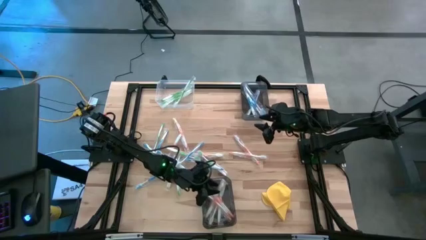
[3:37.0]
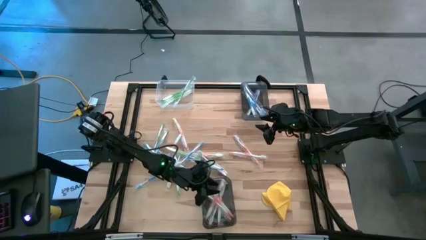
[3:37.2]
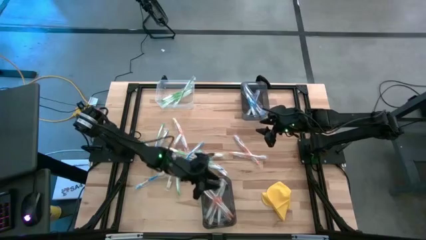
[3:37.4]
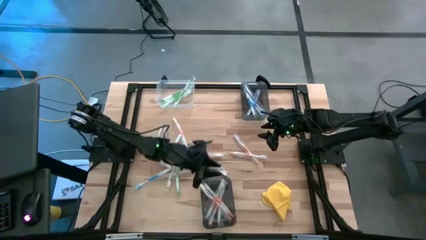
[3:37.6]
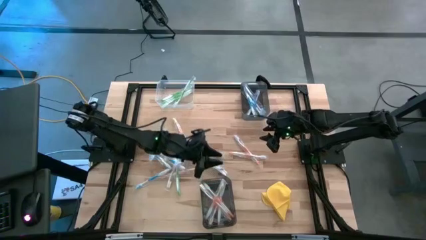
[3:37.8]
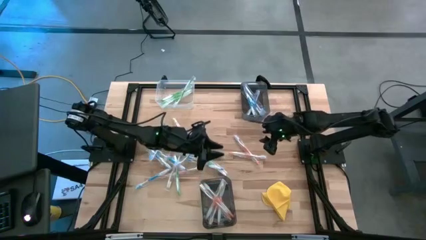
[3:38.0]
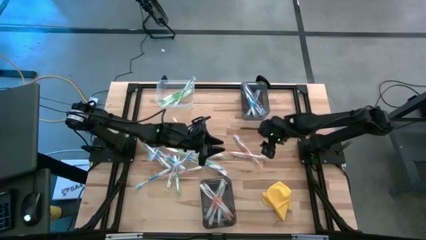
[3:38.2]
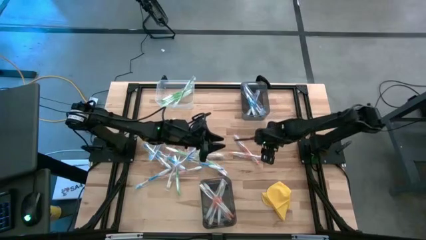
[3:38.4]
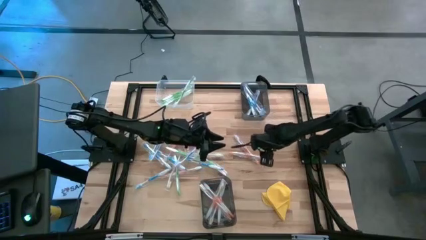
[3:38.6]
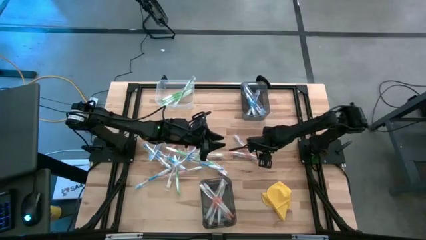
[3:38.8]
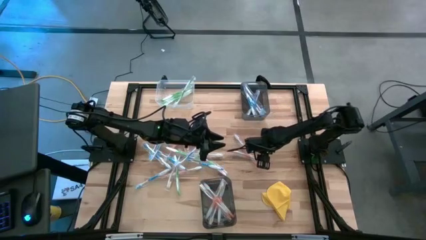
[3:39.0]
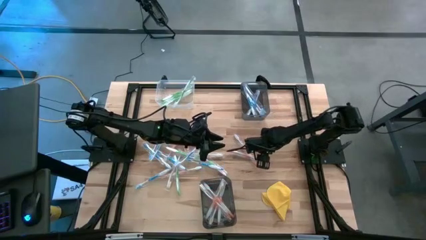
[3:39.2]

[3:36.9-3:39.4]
Task: Pick & Place Toothbrushes
Put the orange toothbrush into the bottom black bin

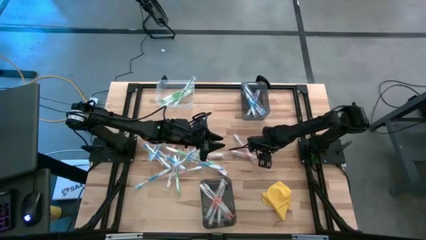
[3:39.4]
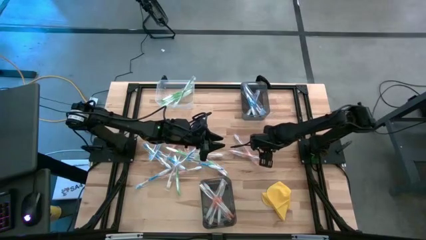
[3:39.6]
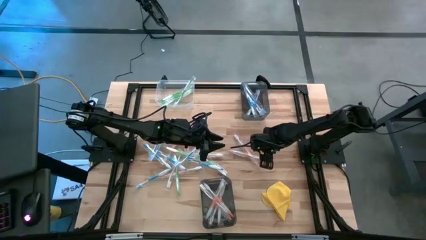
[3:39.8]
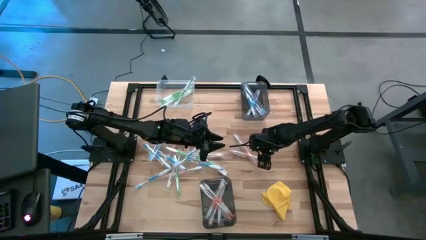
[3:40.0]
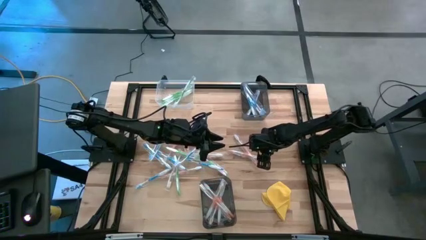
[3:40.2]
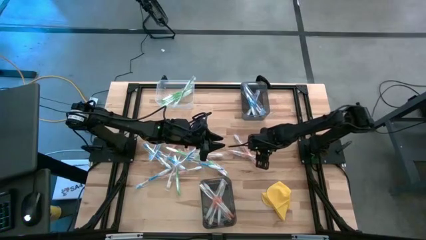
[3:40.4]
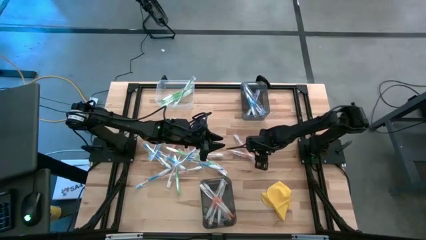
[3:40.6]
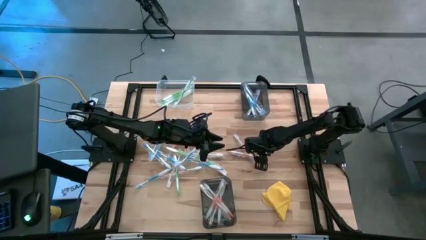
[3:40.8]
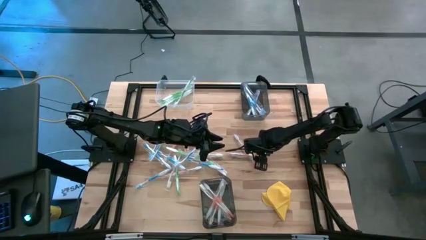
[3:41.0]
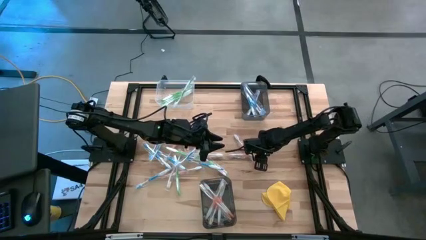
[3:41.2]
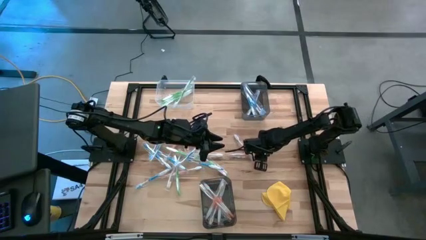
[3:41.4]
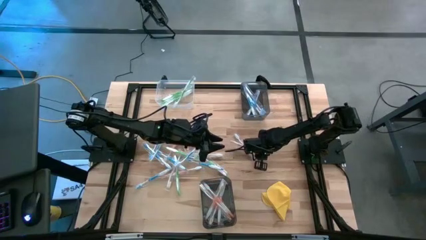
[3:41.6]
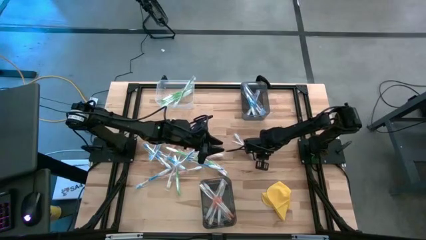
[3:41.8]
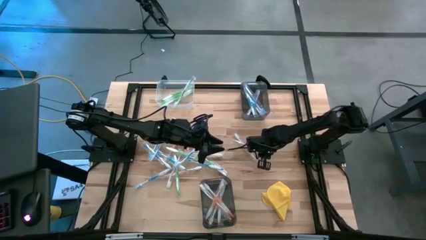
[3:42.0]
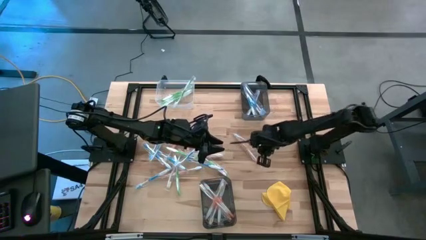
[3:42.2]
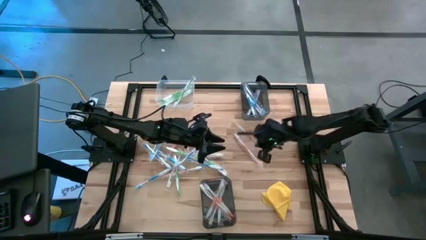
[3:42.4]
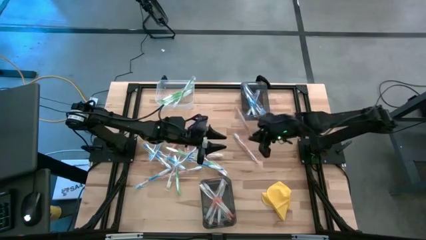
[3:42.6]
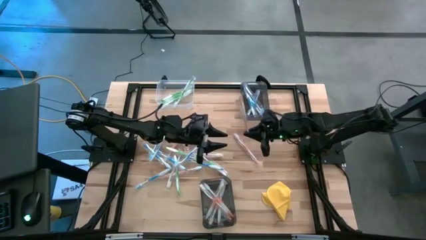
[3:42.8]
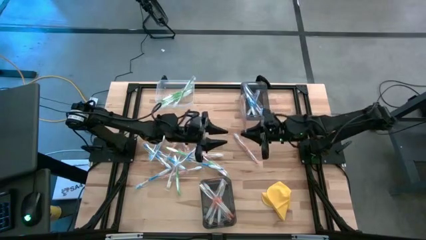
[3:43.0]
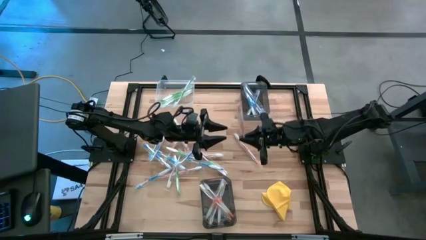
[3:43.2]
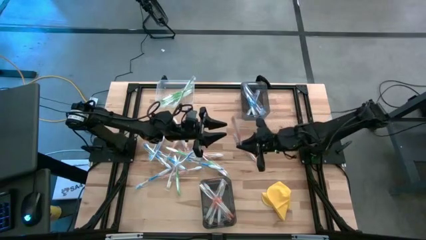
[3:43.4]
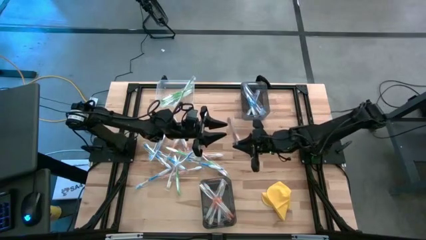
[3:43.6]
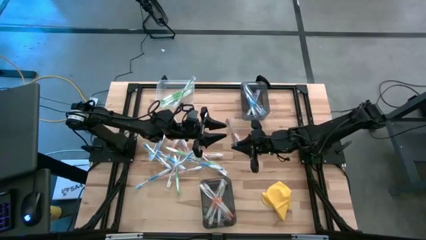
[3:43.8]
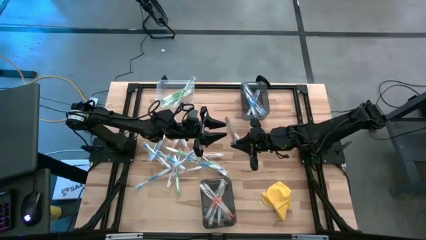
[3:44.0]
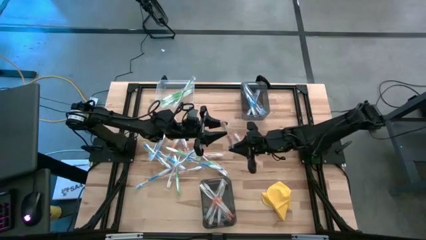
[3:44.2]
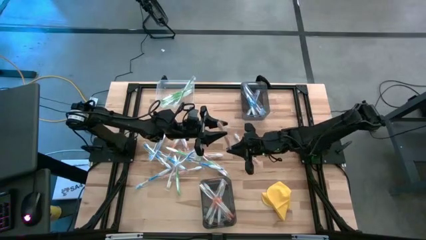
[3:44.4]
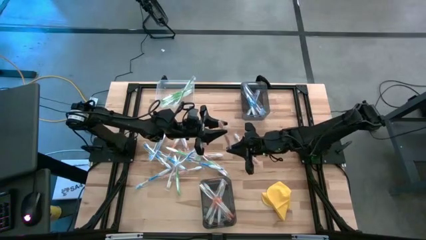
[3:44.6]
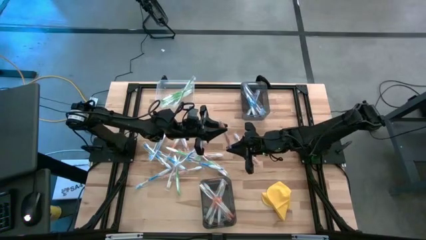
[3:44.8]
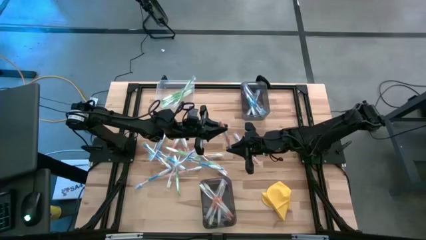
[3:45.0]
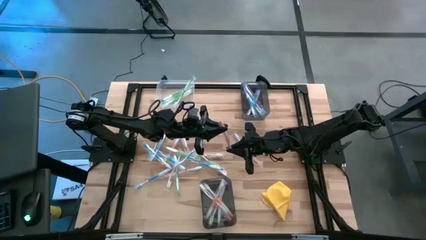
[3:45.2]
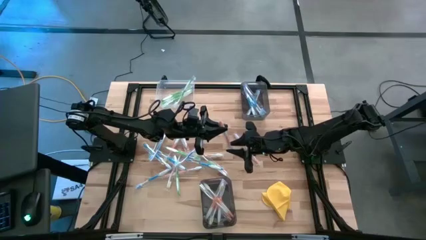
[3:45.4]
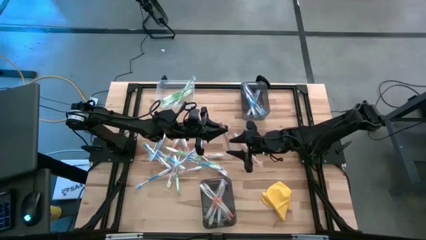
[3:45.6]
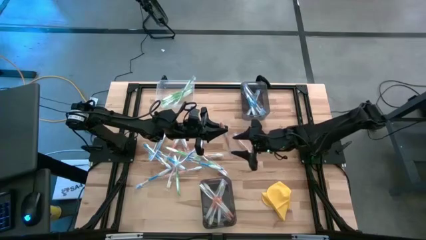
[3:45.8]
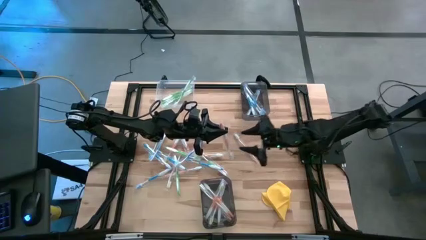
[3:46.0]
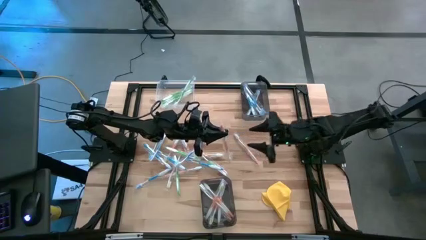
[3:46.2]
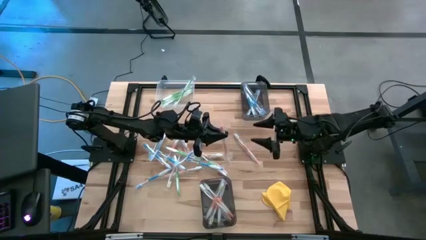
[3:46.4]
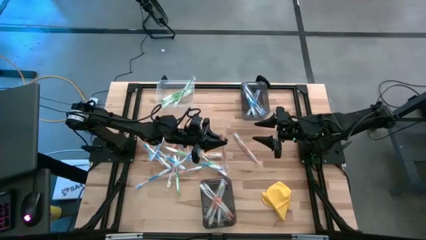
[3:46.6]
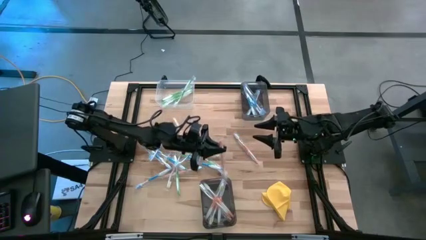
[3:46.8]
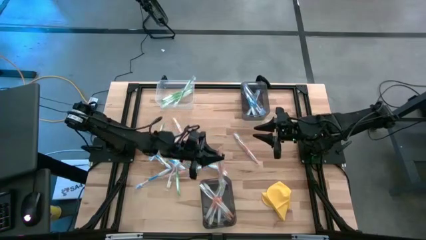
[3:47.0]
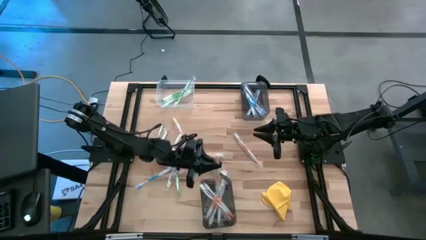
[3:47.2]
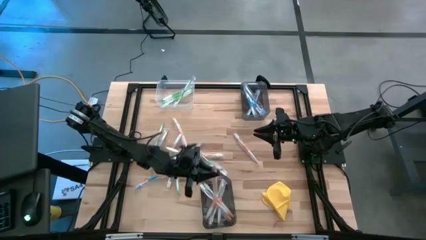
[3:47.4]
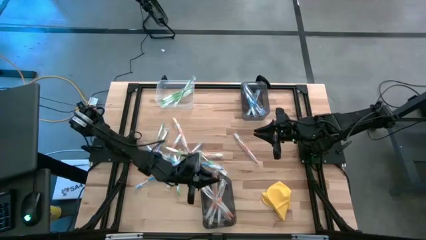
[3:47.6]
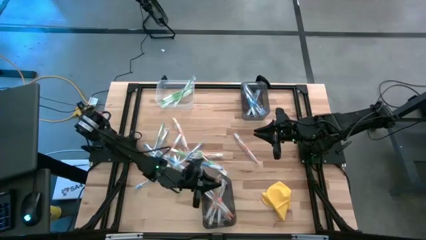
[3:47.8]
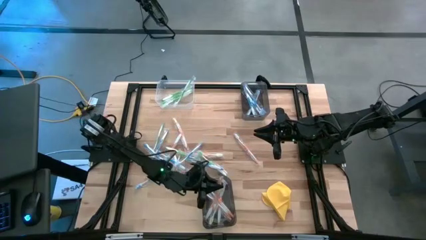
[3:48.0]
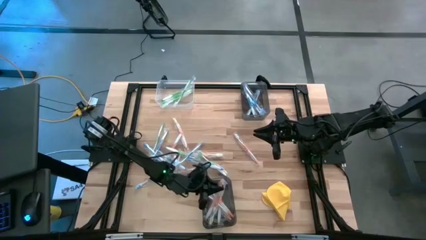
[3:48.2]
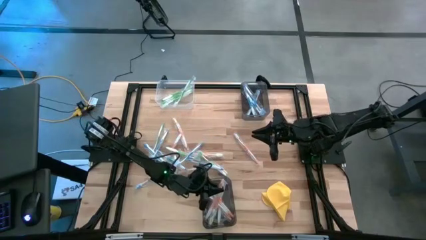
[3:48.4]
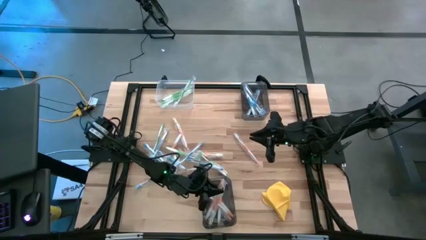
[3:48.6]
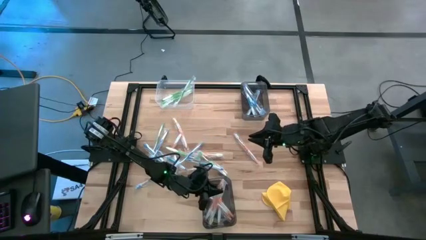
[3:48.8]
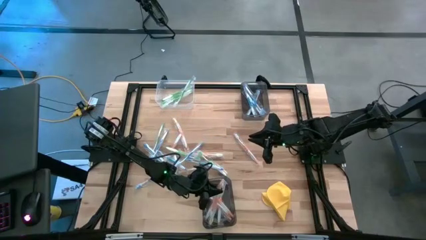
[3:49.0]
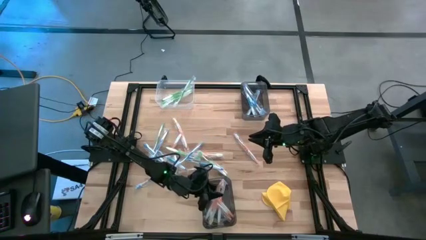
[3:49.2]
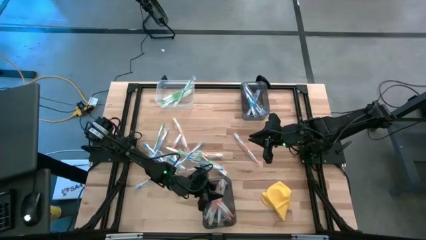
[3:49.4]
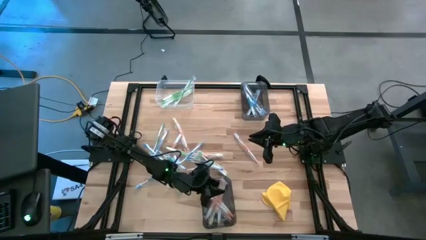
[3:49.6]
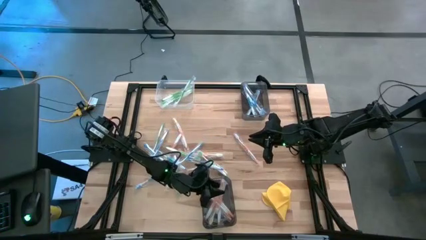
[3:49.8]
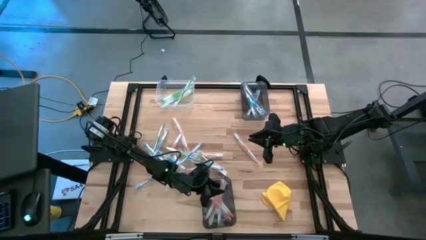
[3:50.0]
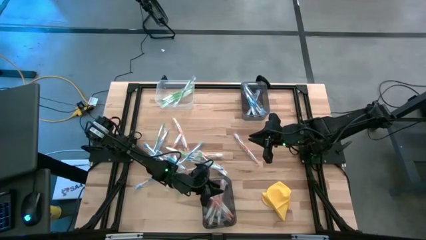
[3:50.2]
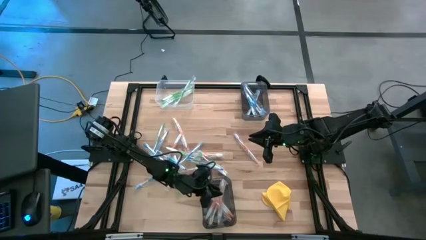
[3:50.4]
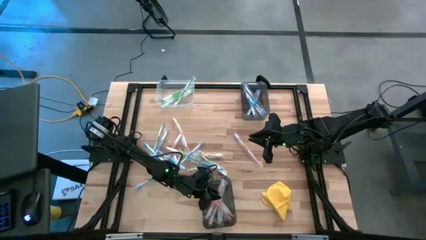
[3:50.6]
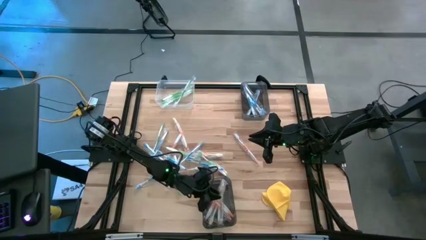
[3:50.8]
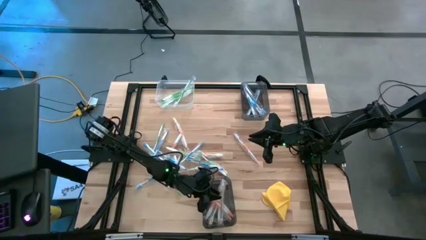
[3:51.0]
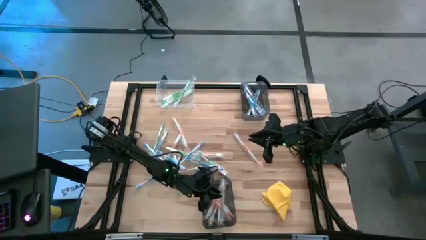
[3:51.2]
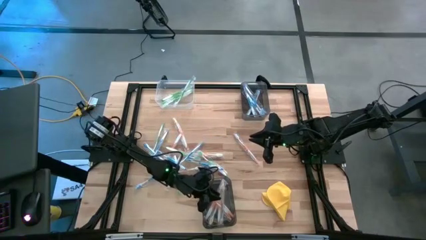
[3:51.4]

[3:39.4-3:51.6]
Put the orange toothbrush into the bottom black bin

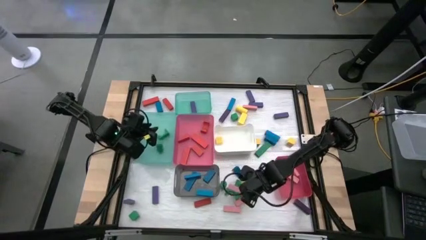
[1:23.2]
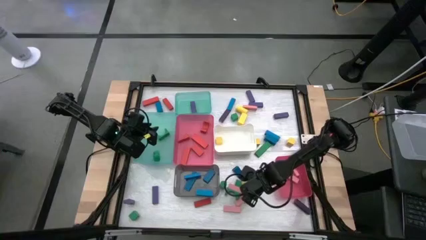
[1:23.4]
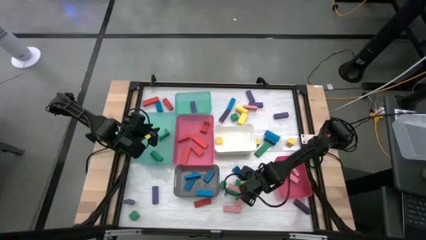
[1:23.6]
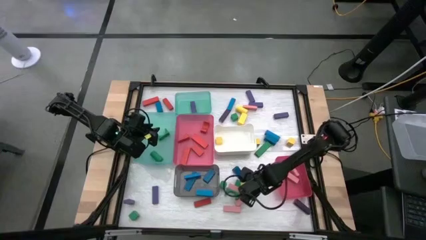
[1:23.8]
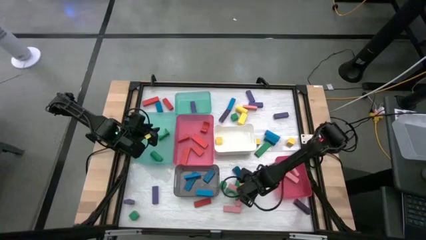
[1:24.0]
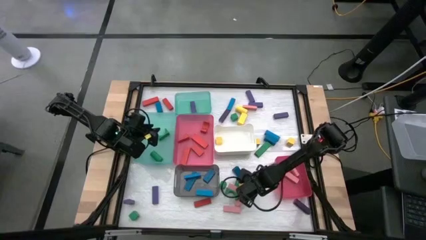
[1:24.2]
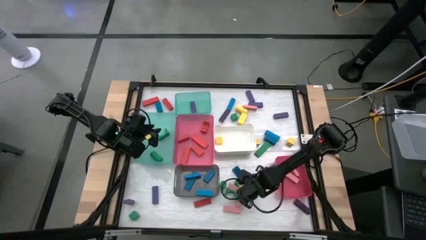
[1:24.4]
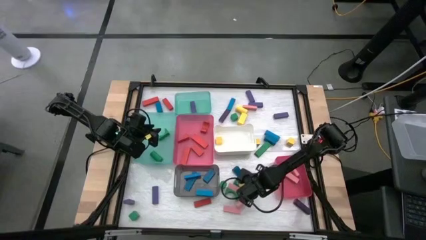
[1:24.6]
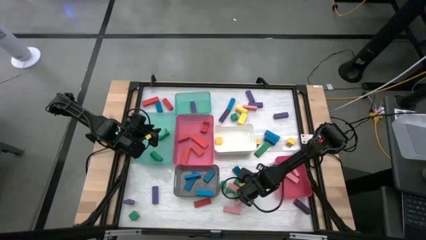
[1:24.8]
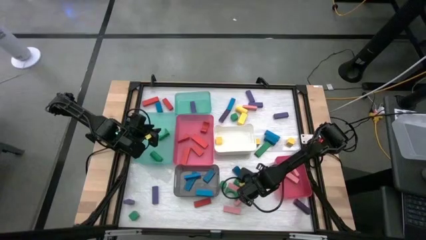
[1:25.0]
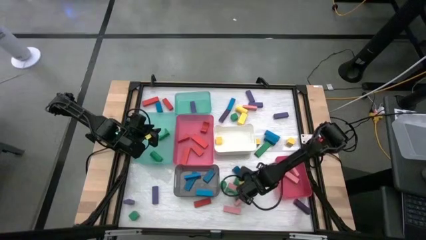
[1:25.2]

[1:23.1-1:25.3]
Task: Sort blocks
Put the green block into the bottom green bin
